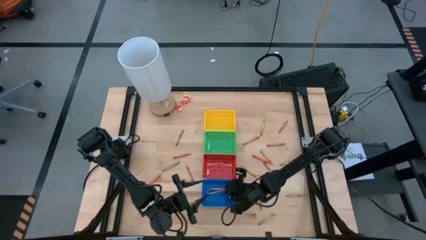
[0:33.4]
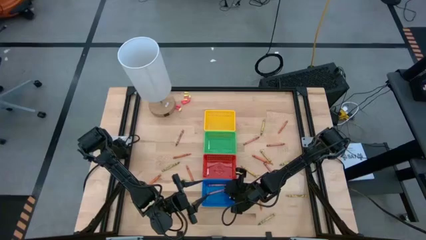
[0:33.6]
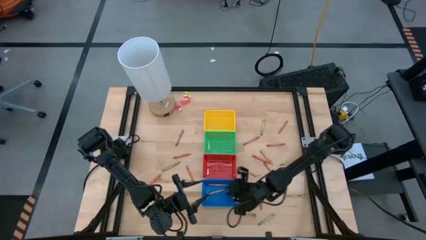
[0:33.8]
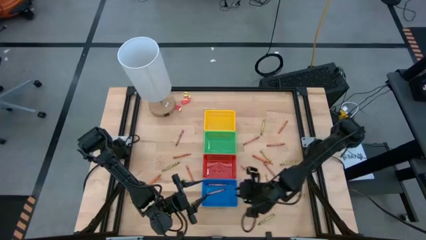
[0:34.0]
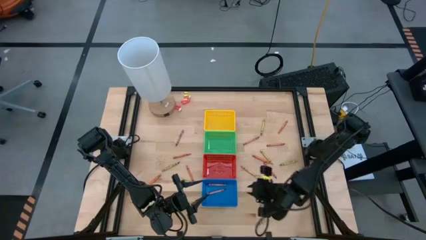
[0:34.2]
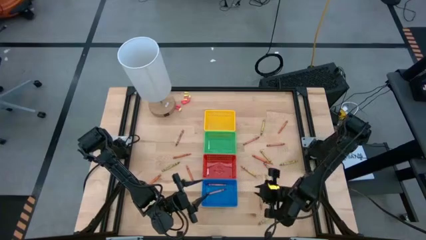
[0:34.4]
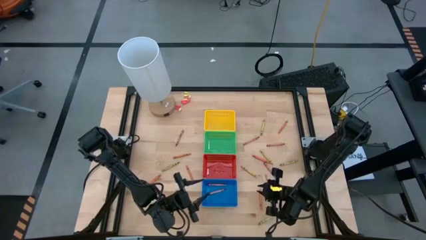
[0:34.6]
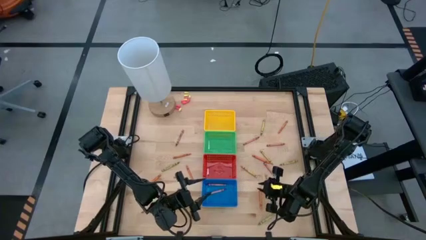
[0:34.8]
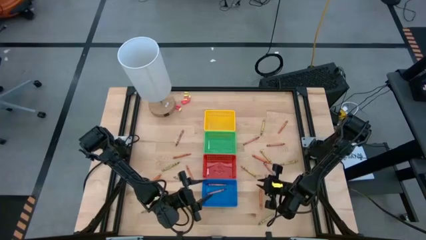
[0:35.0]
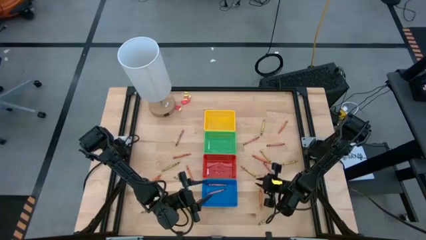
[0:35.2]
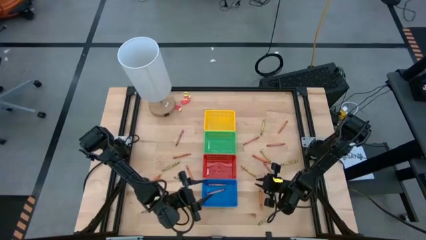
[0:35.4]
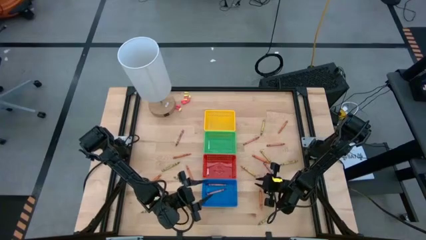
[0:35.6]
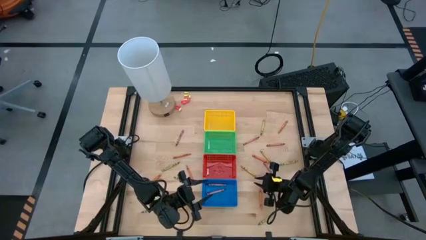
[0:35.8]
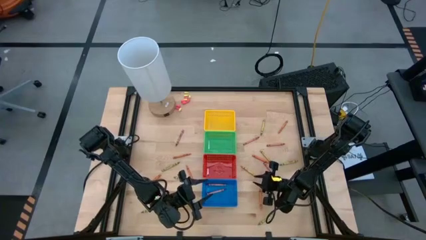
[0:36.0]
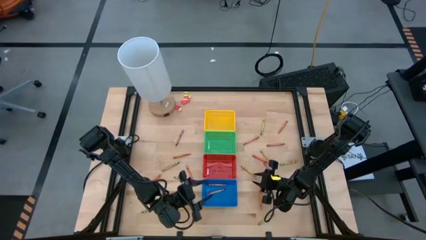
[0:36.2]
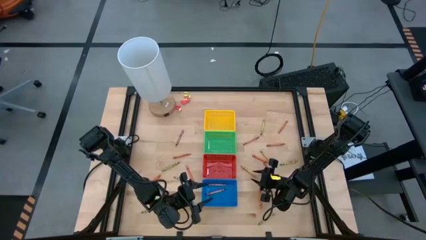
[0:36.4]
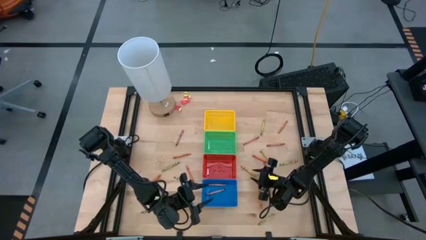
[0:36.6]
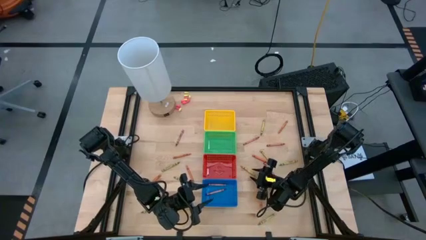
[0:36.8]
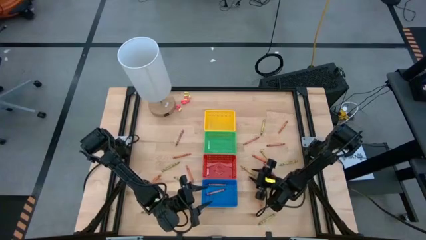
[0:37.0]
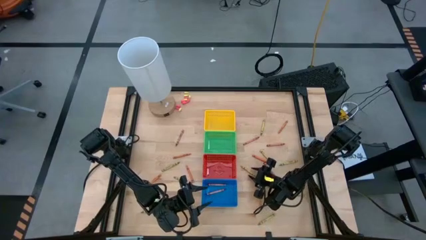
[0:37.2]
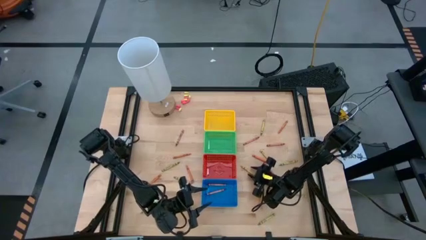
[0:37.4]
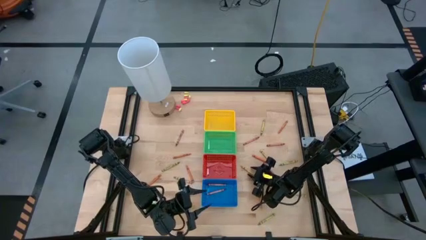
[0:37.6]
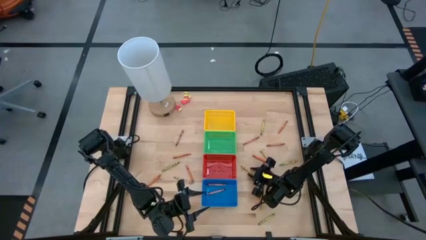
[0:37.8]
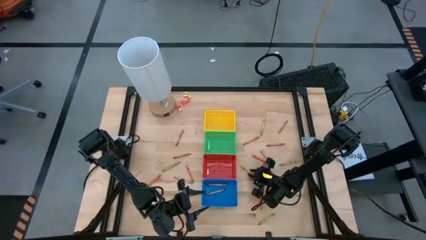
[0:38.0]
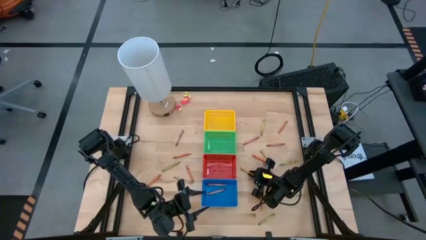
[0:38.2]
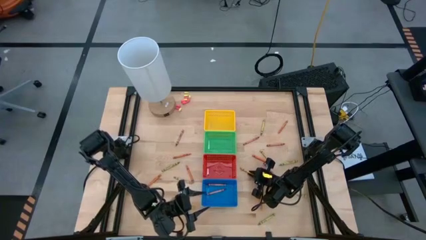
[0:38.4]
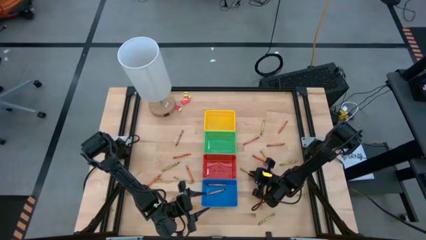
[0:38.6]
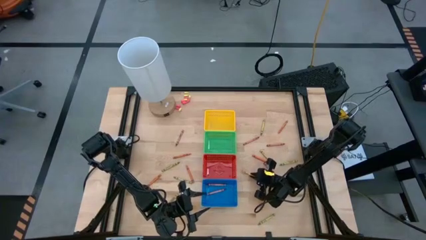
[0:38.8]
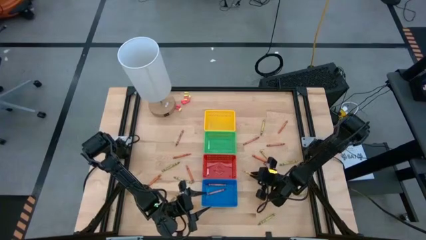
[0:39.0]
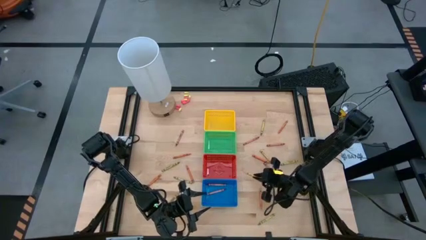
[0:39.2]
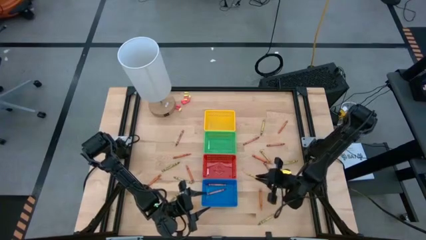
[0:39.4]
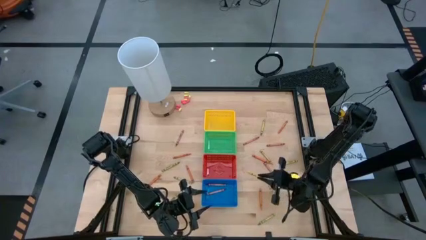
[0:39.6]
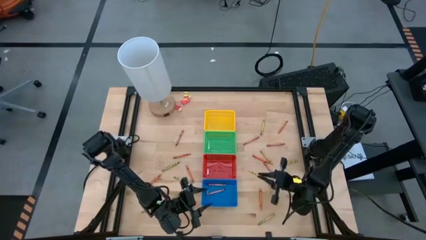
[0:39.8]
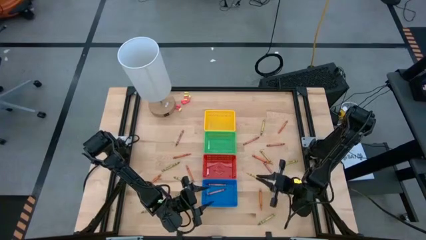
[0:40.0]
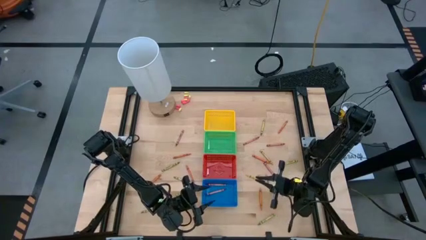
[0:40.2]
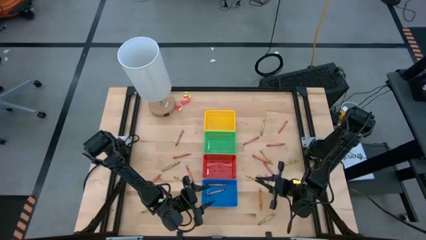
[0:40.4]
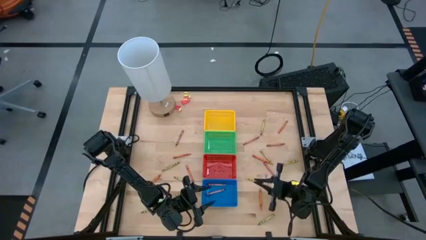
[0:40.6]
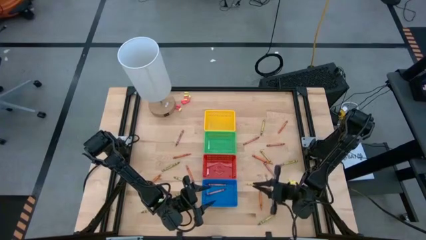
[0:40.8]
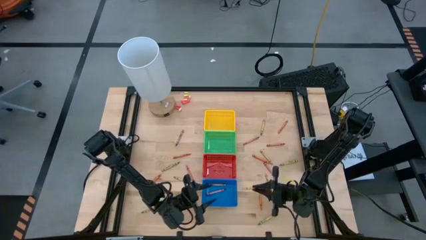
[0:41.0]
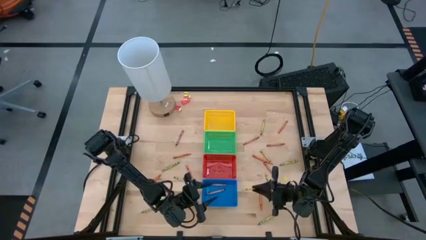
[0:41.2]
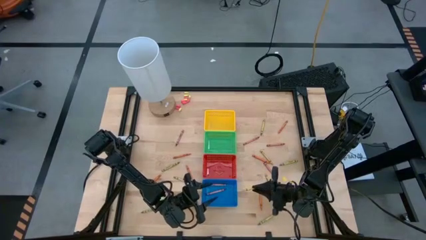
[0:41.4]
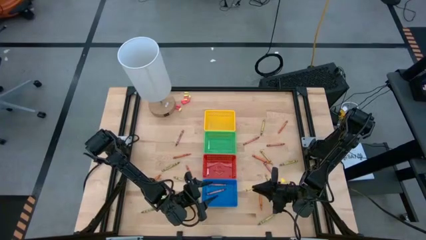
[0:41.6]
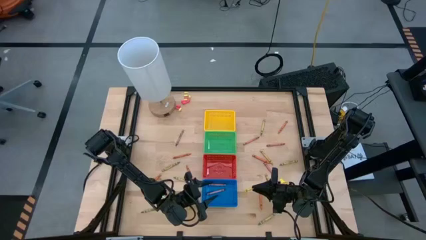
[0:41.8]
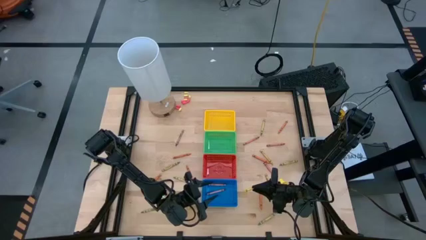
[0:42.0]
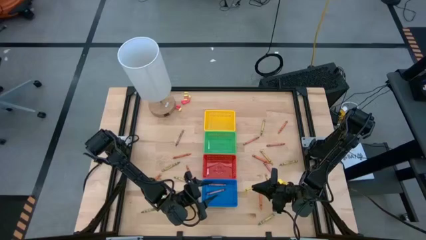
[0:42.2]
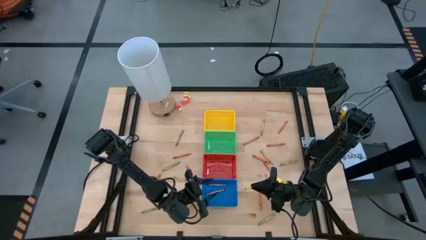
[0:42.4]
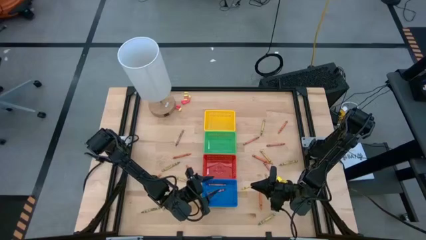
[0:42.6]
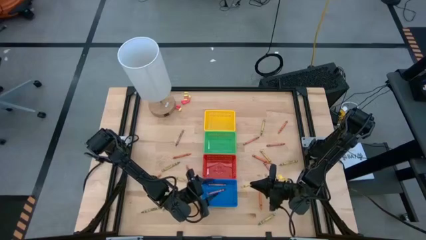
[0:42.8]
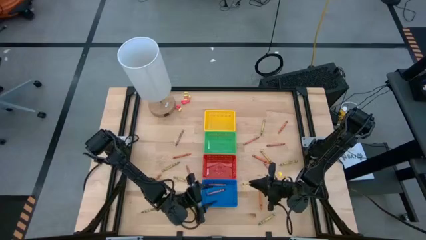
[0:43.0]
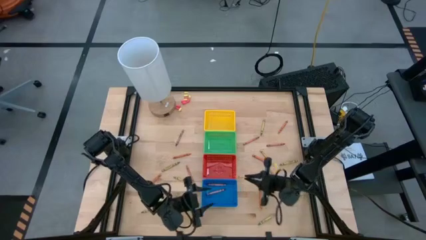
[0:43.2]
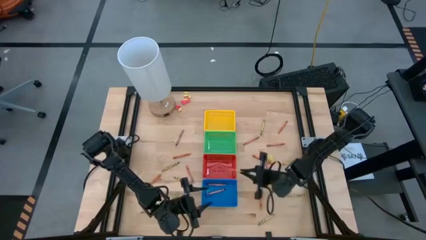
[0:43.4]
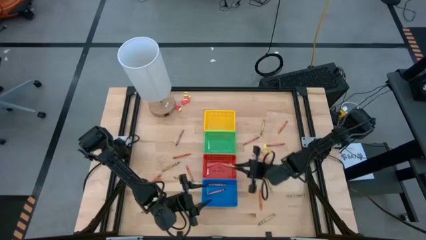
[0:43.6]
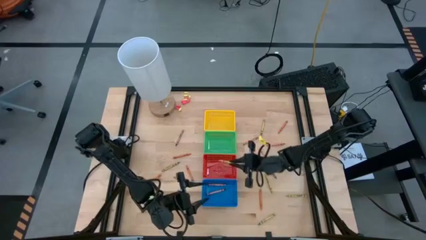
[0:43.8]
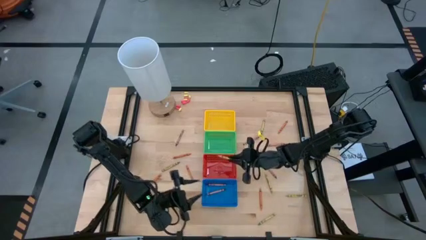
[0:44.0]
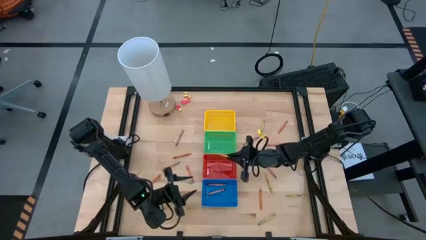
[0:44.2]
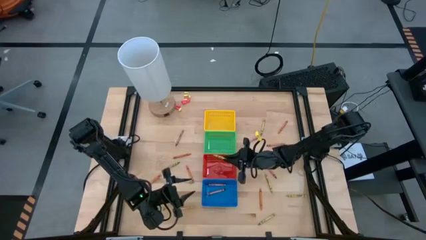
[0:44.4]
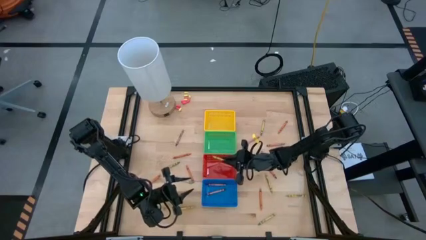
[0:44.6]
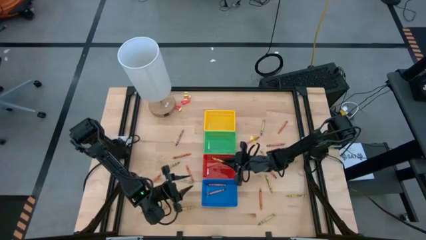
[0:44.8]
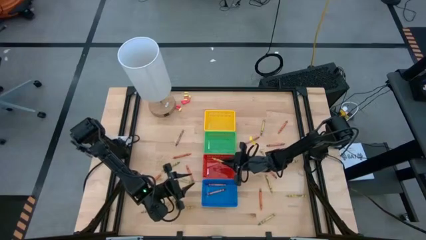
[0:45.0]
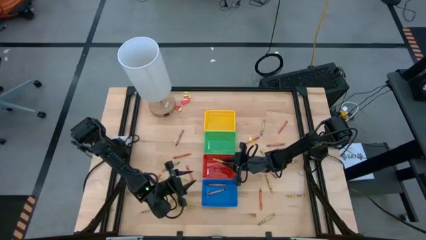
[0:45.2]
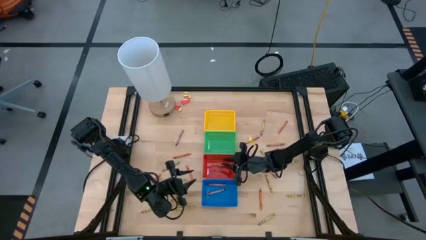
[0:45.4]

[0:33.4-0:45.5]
Task: Sort crayons
Put the yellow crayon into the red bin

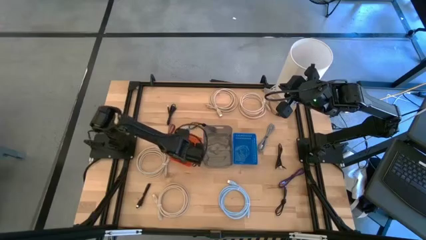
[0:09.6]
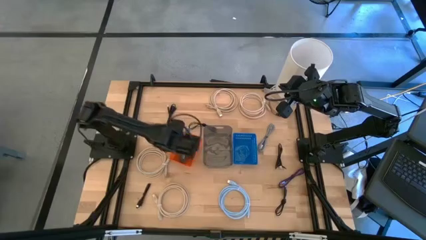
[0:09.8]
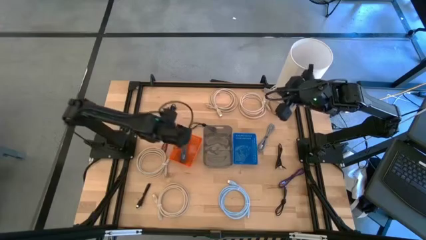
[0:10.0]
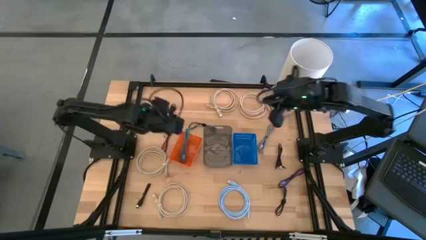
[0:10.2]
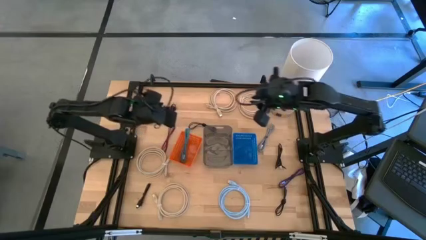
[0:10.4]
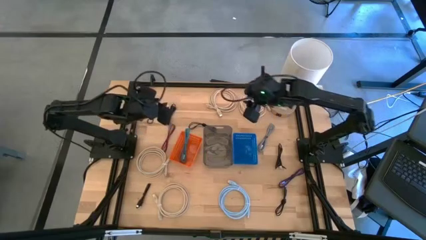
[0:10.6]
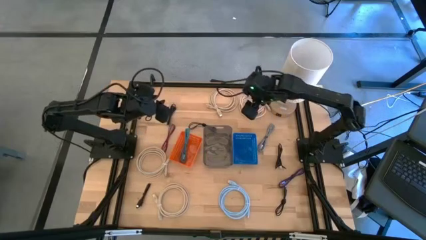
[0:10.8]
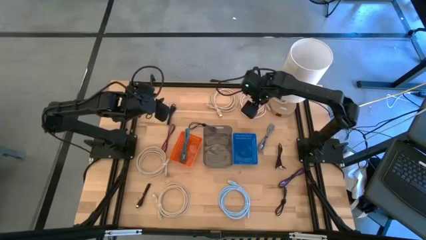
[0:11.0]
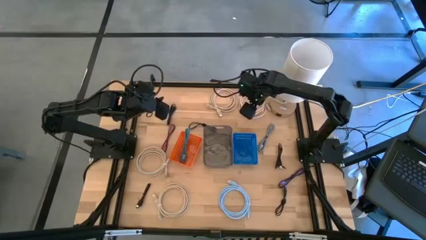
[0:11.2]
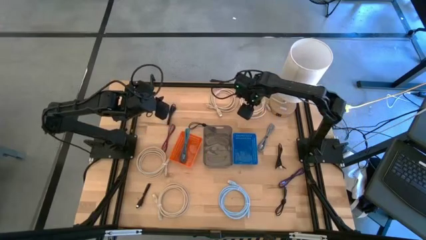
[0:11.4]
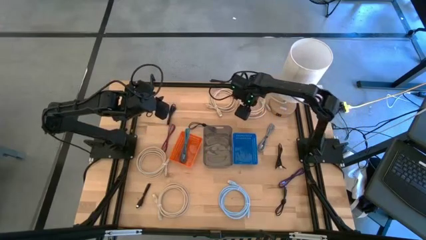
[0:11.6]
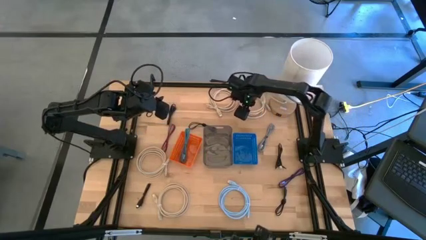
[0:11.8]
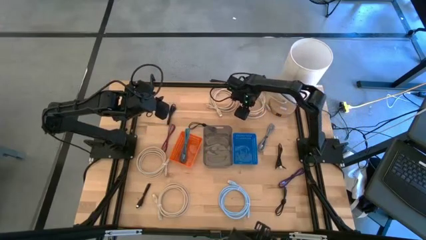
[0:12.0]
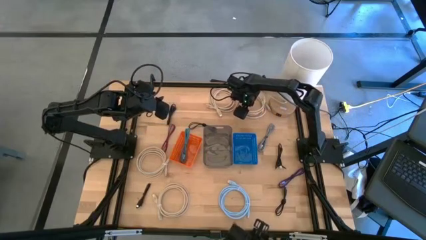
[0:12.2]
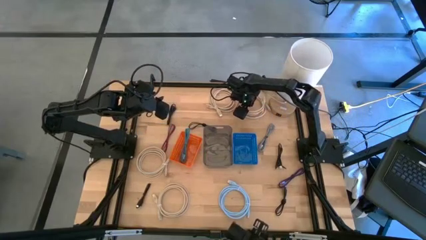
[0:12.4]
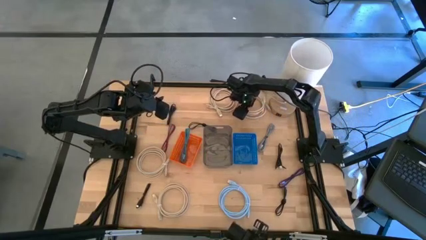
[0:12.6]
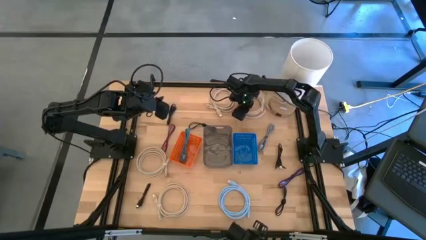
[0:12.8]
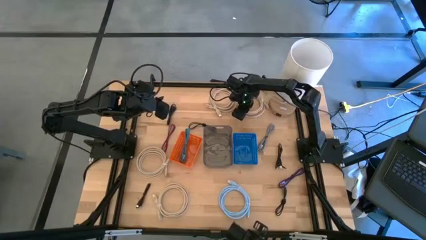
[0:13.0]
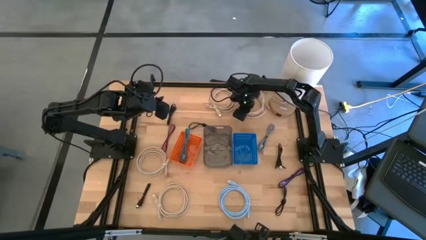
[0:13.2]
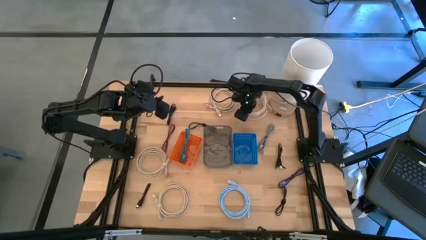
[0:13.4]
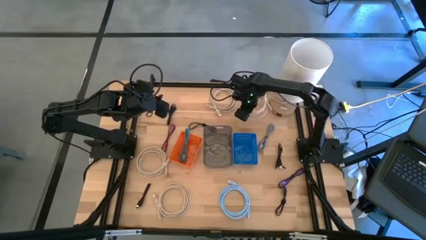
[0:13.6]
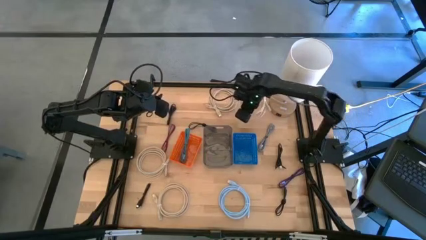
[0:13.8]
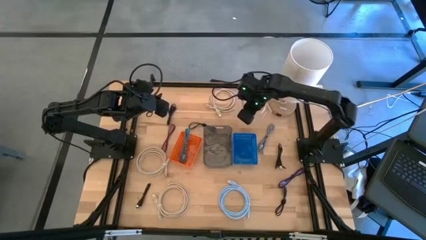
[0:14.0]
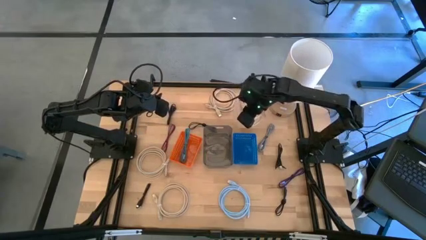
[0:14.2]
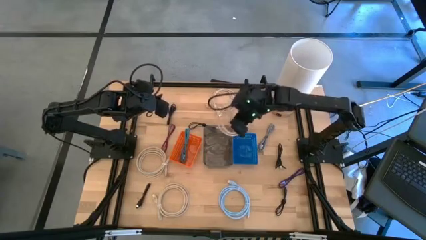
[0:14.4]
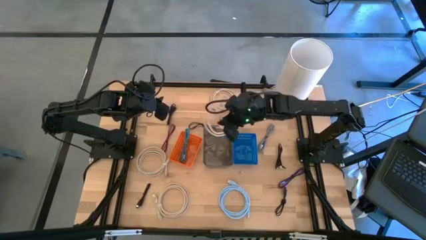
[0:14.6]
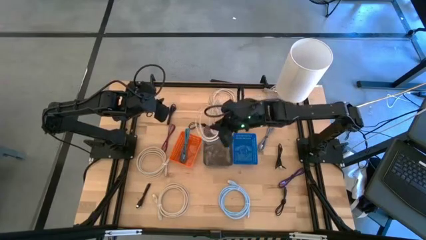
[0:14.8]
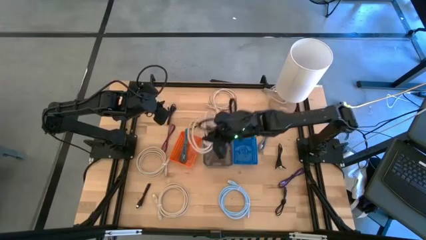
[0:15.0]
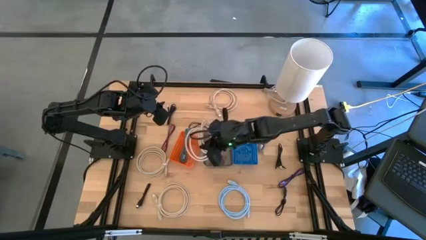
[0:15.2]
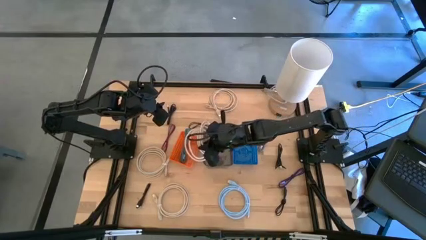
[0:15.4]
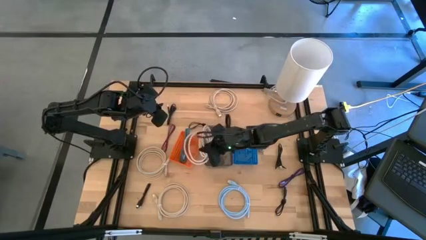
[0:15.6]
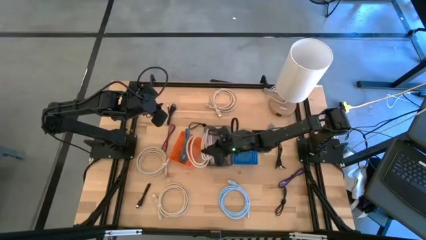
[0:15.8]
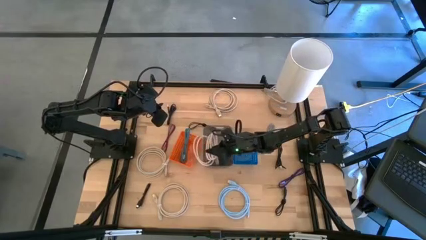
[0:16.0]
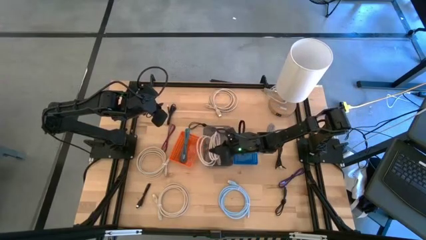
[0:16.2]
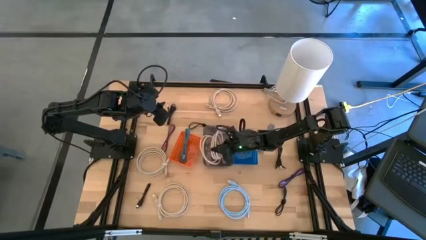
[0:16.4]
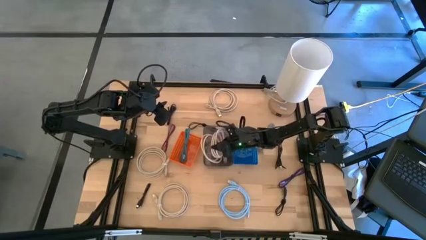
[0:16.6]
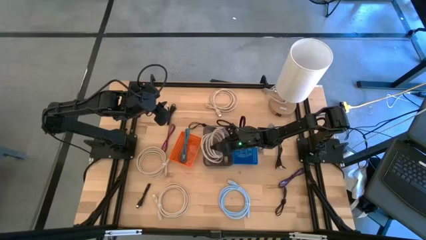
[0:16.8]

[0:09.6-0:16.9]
Task: Pick & Place USB Port
Put the light brown HDMI cable into the black bin
